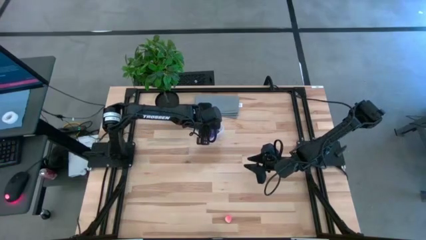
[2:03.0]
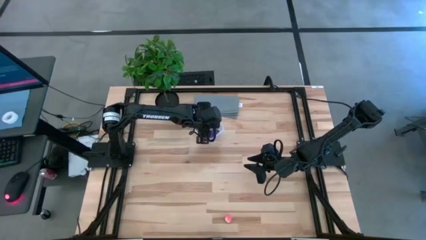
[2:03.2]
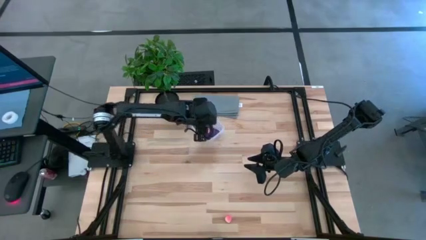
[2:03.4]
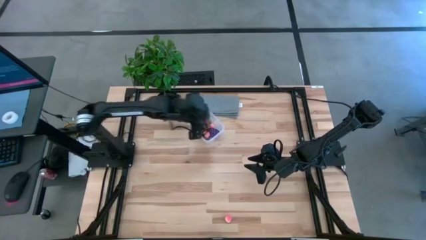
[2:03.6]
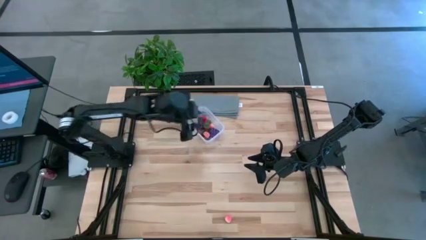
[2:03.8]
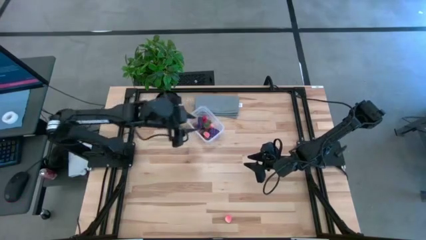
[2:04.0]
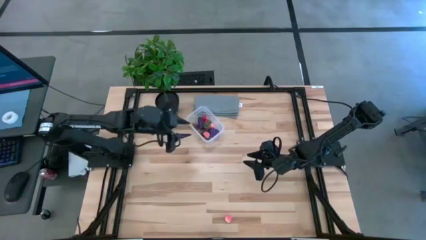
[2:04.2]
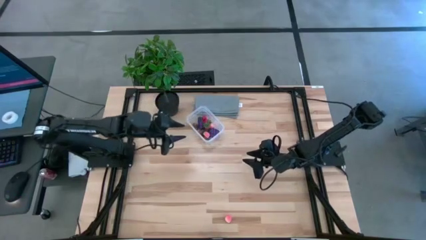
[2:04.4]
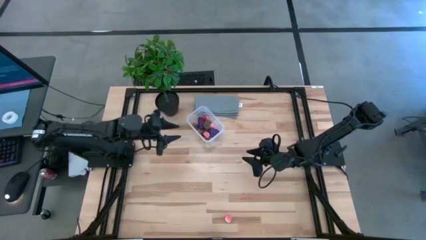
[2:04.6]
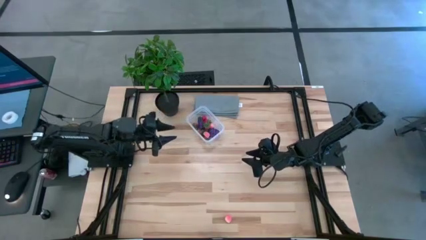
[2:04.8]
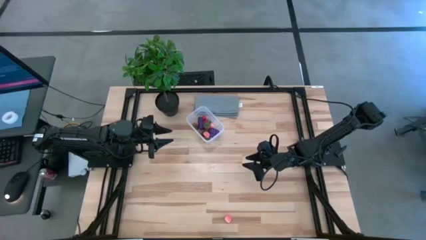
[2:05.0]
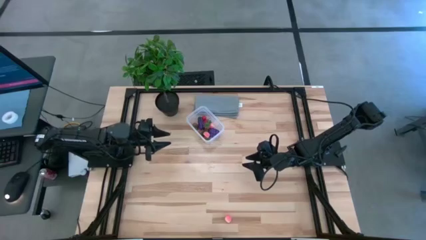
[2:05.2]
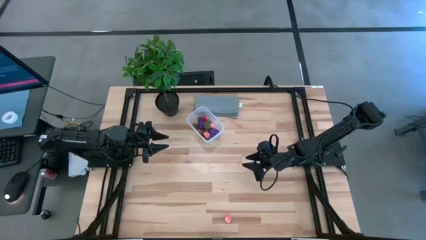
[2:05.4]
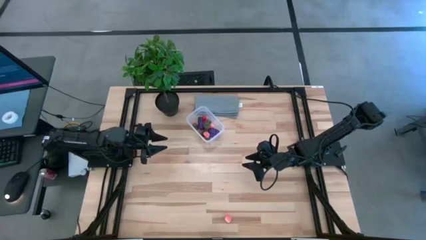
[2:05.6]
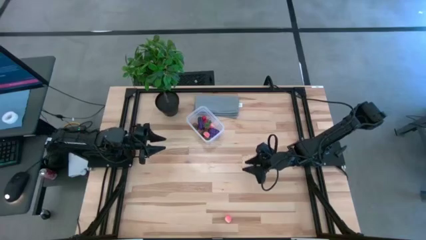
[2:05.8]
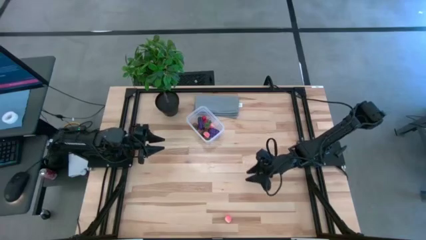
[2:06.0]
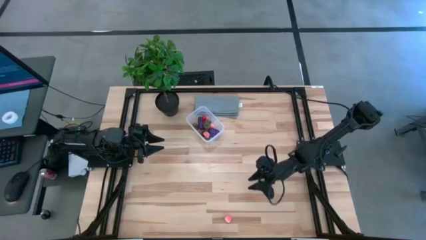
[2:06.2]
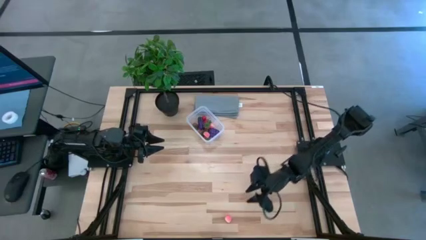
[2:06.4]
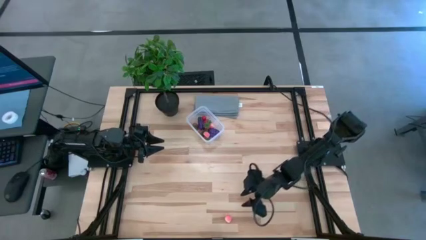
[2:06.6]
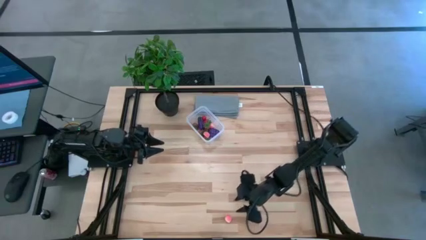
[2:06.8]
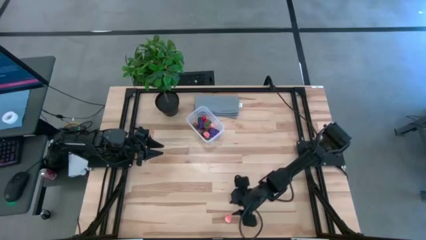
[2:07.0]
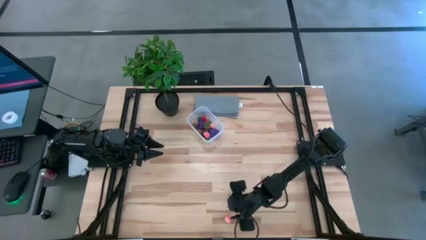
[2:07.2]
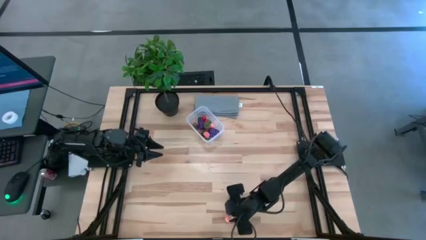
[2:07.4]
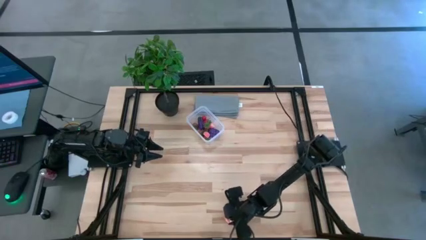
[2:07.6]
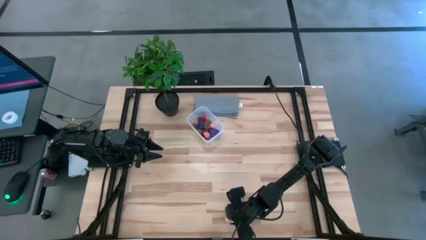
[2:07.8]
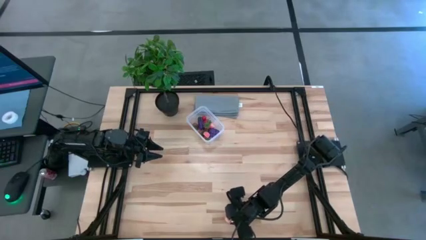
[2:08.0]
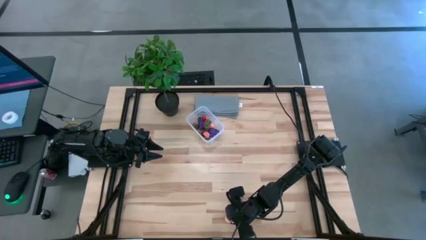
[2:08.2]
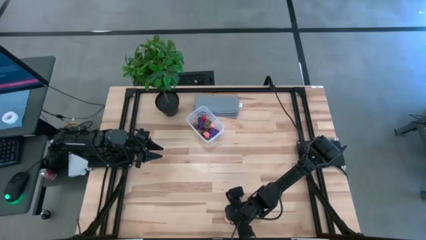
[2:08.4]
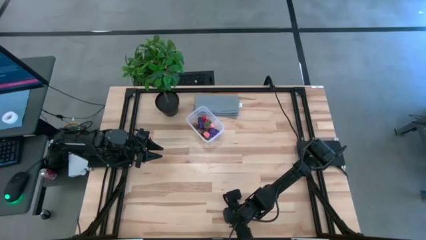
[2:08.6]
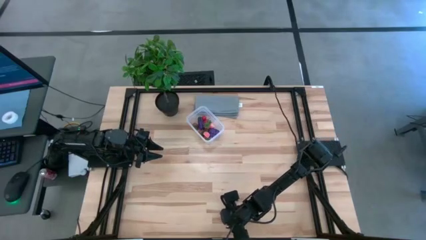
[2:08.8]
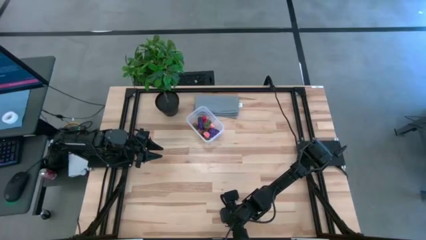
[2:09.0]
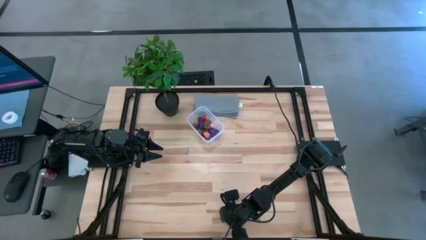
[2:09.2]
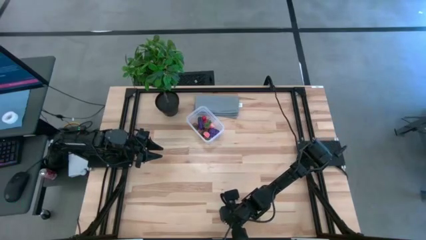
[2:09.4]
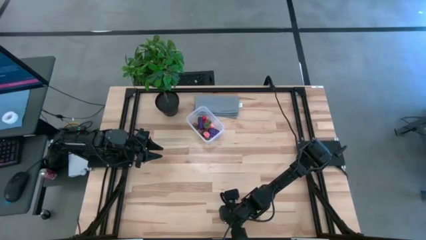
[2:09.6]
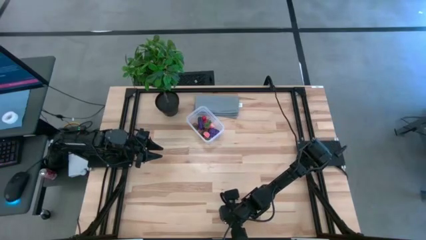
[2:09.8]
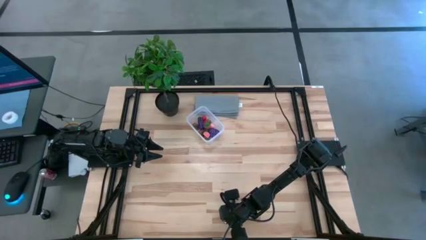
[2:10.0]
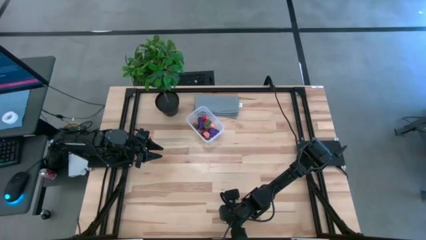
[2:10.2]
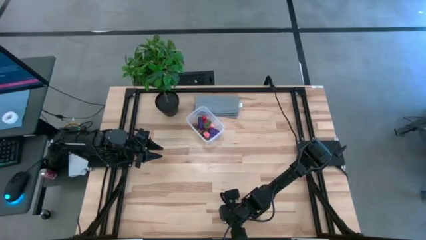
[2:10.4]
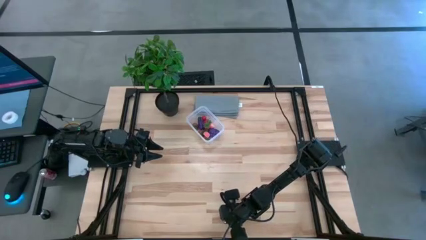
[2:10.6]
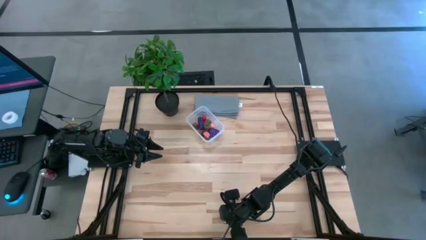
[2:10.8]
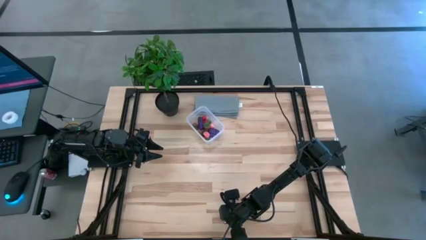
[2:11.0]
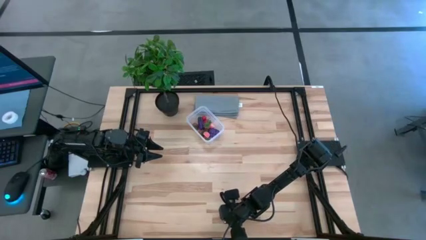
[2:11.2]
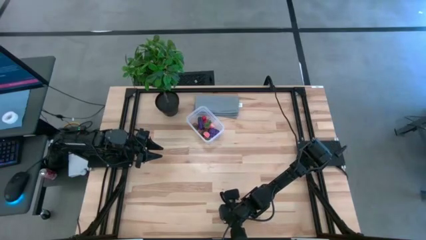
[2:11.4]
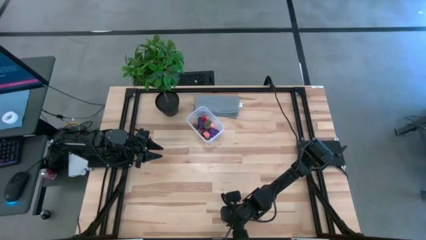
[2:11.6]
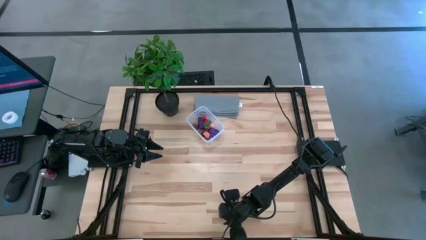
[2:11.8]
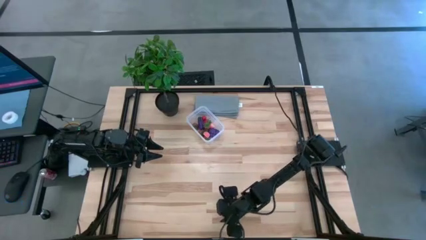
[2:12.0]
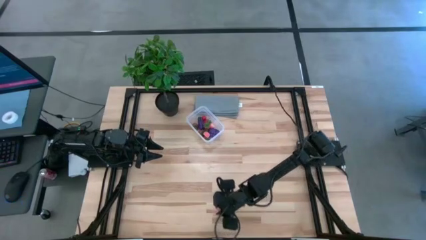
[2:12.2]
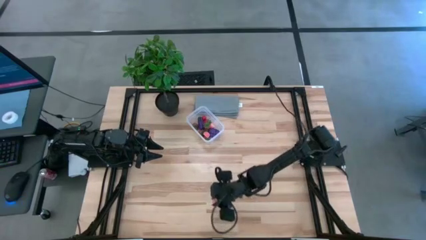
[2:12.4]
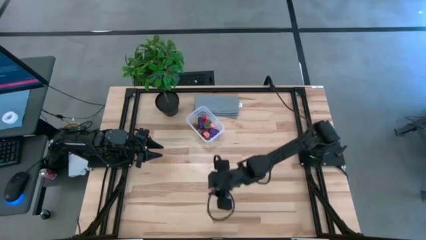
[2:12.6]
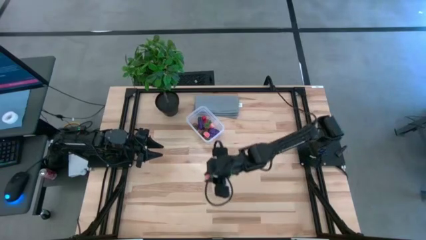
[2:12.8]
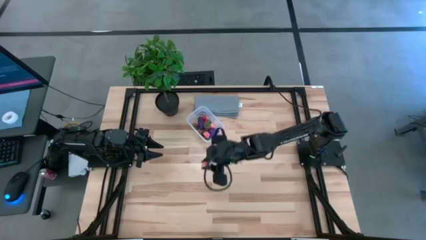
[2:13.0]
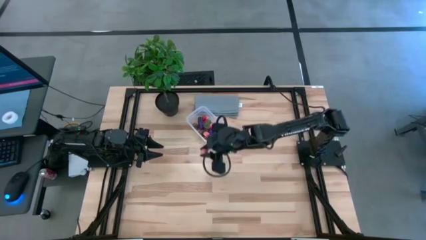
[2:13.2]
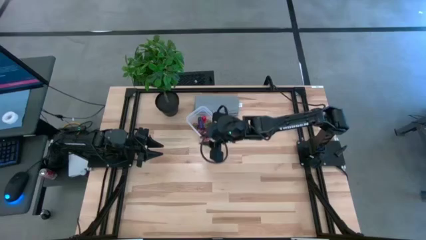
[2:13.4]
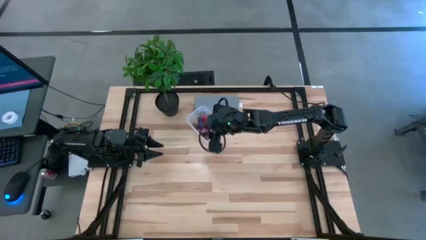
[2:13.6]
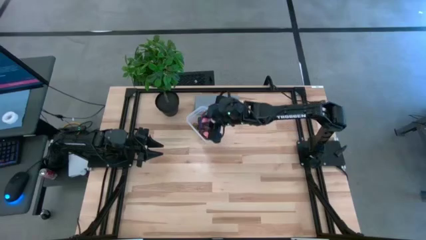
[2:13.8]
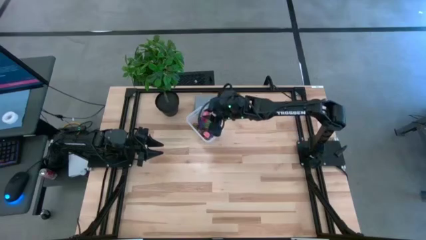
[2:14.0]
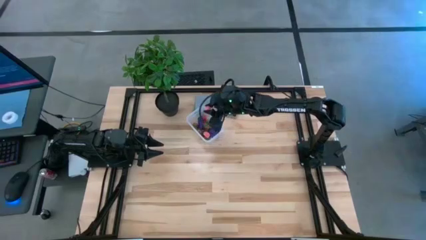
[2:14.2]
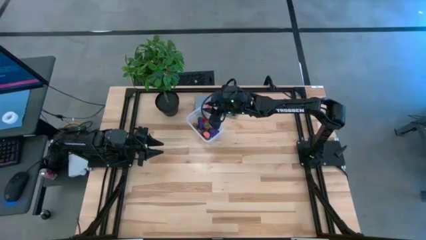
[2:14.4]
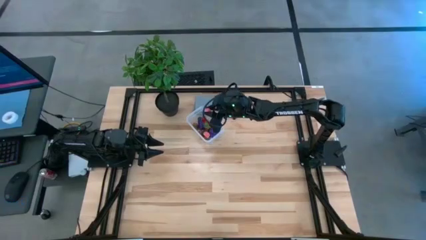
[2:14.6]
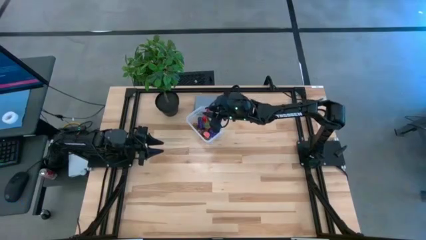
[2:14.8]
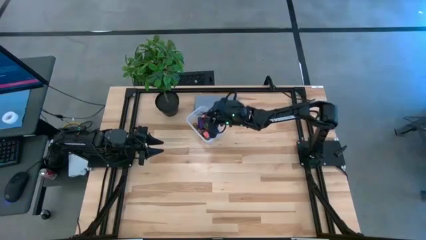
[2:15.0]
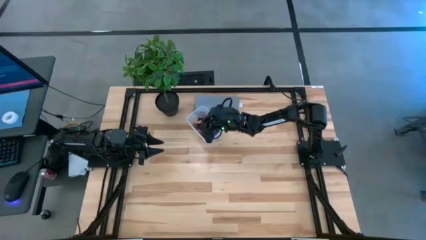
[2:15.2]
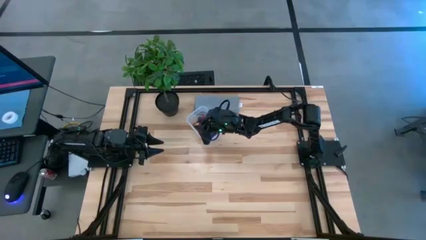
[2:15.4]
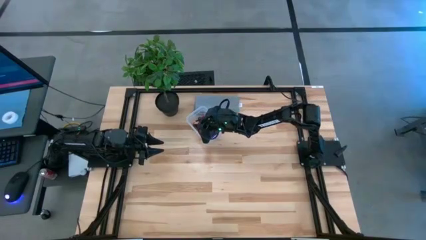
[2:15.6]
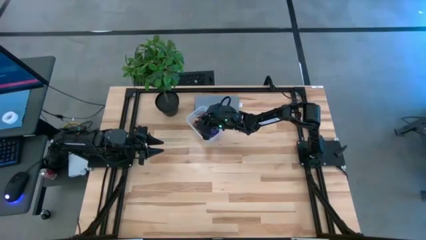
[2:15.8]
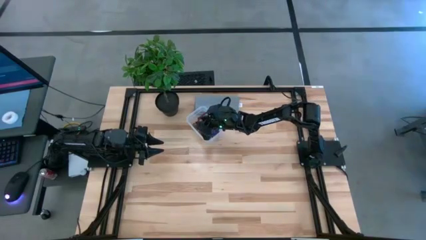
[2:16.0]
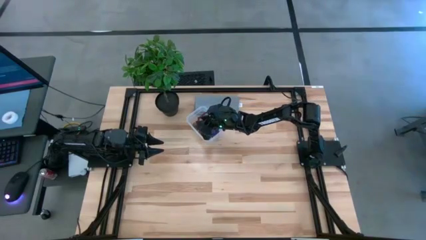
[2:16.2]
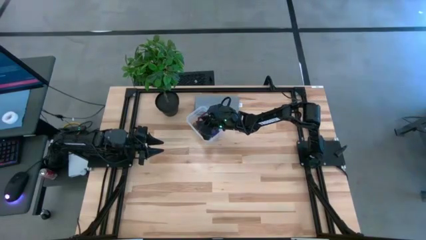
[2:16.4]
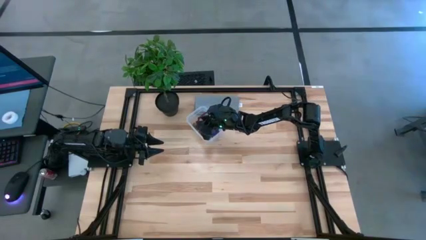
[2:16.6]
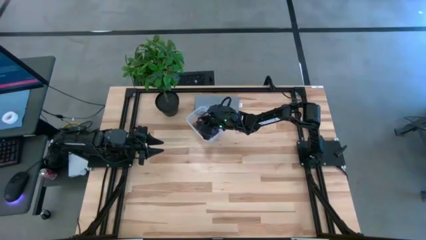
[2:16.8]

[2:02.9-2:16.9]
Task: Pick and placing Produce into tupperware
Put the pink peach into the transparent bin
